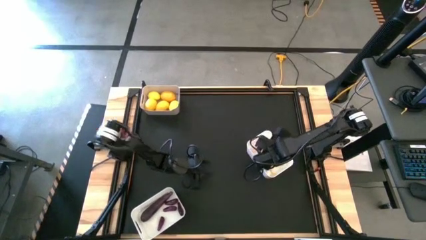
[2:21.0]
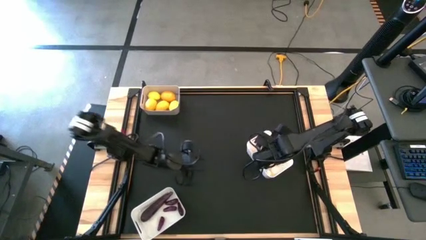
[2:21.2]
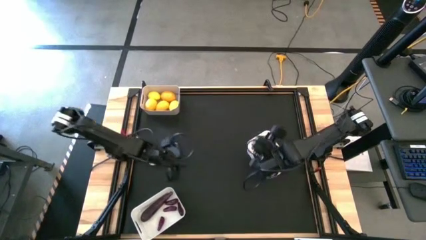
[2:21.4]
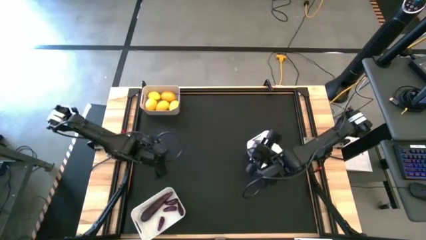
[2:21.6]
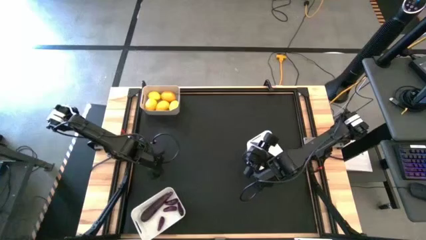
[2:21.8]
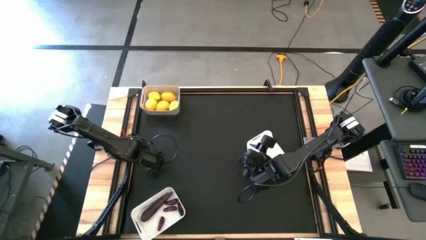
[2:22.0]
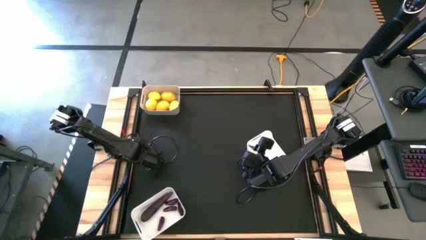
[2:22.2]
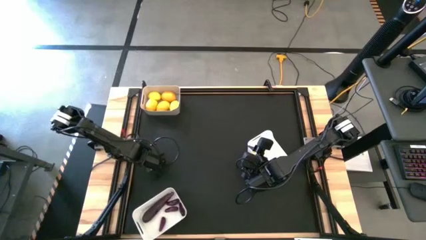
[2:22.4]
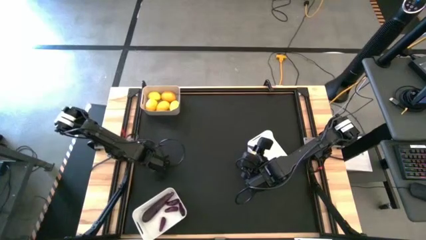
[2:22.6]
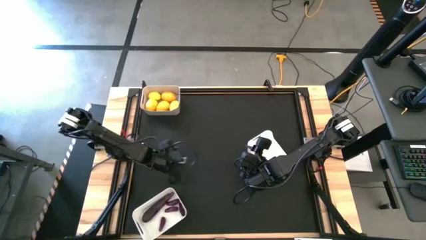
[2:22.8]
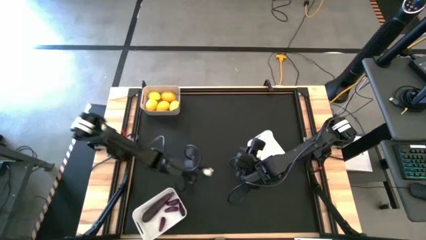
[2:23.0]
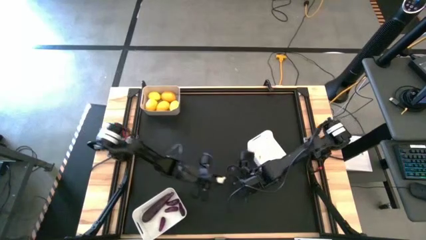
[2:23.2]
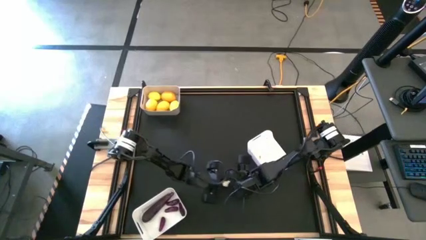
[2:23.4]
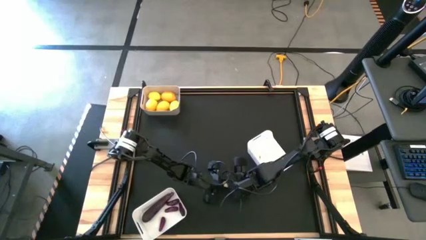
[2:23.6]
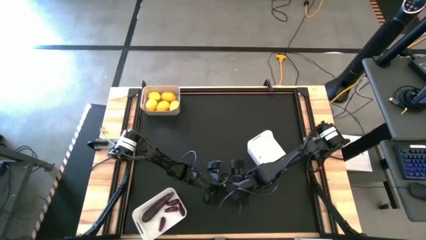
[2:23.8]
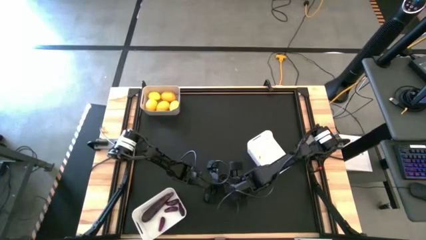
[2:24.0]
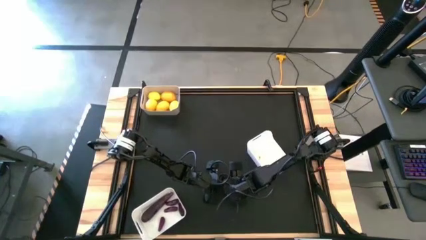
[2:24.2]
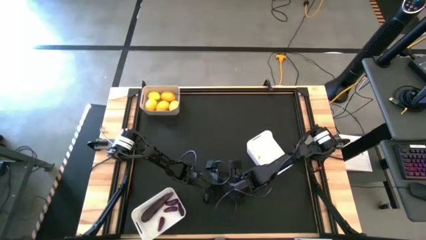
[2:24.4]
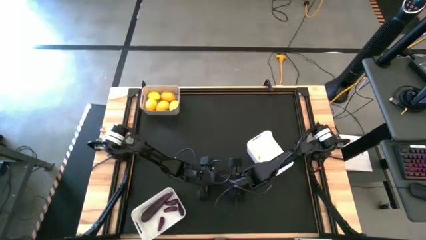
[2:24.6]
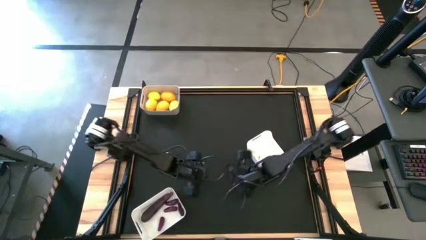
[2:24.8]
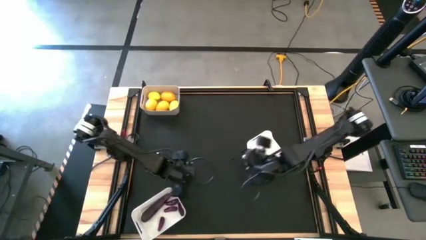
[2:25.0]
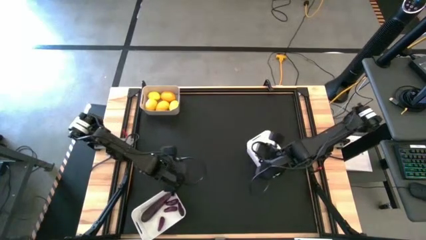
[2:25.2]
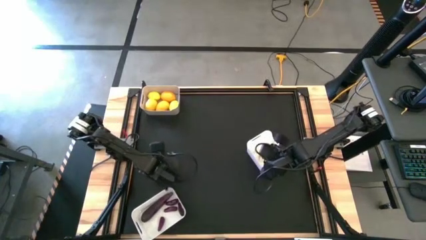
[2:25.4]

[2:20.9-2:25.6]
Task: Sort produce into baskets
Put the garlic into the middle right white bin

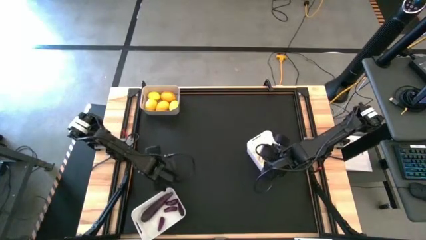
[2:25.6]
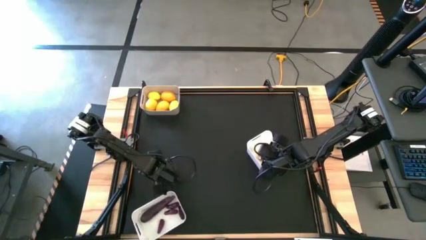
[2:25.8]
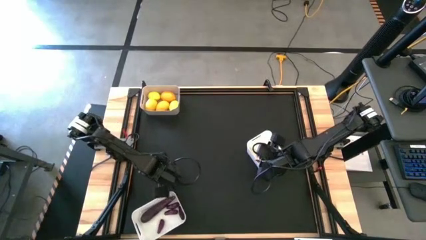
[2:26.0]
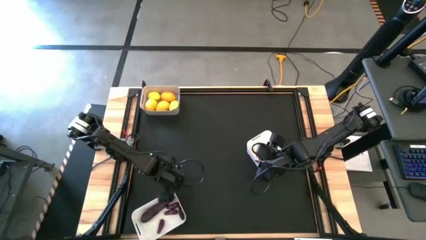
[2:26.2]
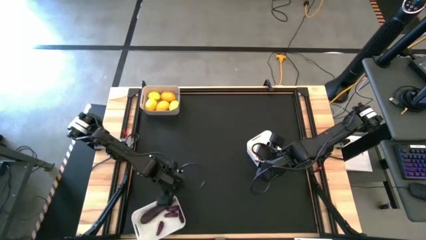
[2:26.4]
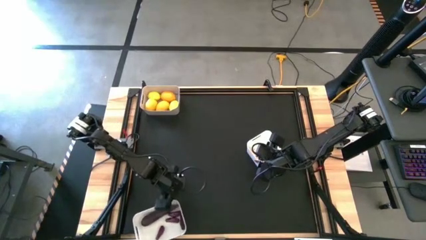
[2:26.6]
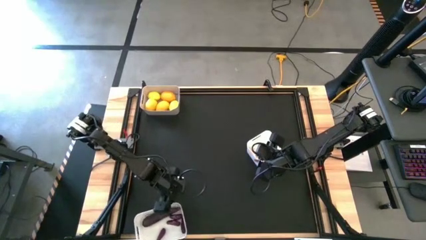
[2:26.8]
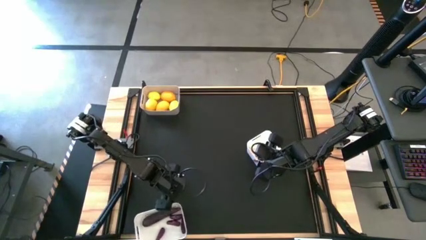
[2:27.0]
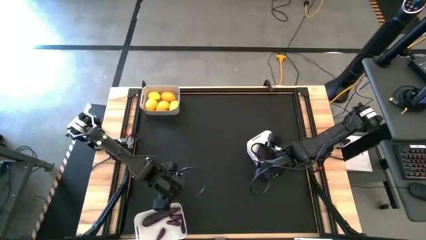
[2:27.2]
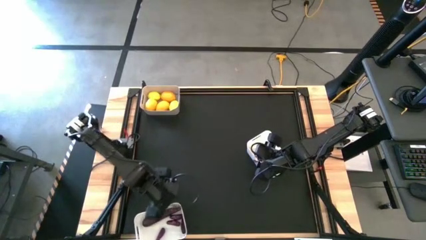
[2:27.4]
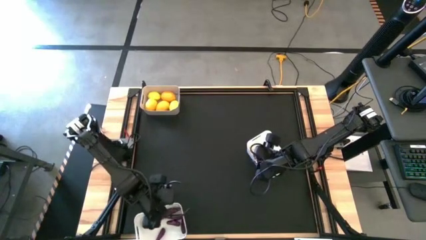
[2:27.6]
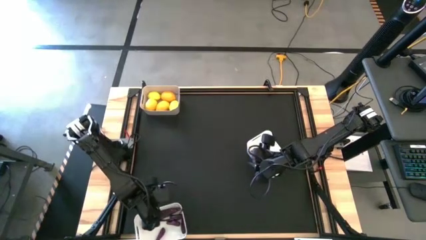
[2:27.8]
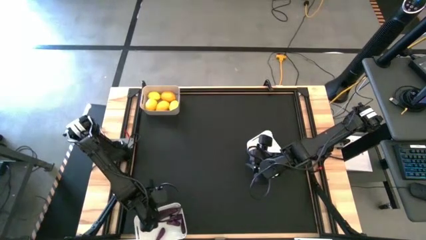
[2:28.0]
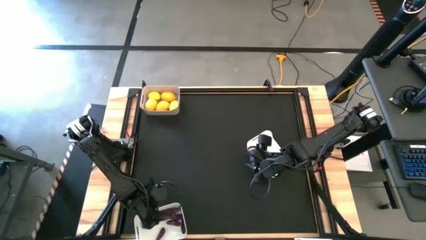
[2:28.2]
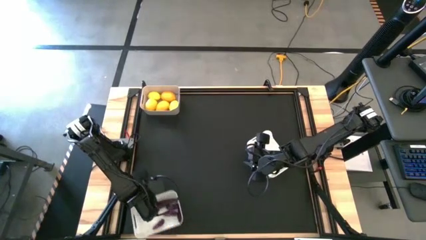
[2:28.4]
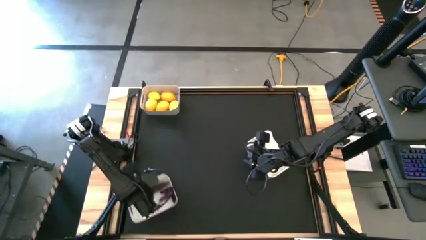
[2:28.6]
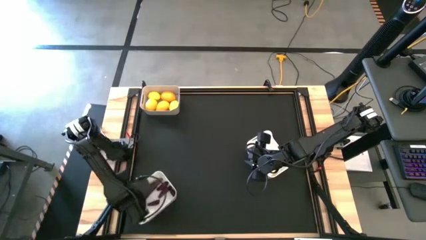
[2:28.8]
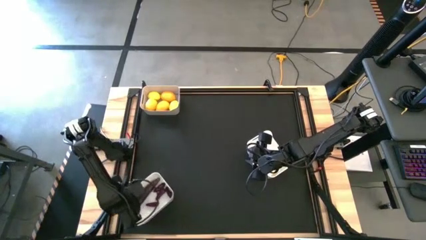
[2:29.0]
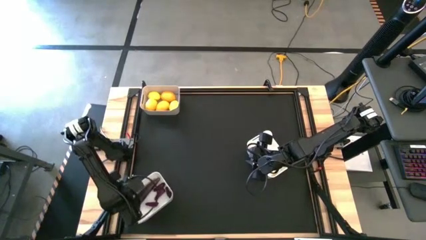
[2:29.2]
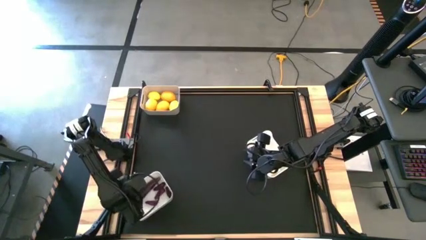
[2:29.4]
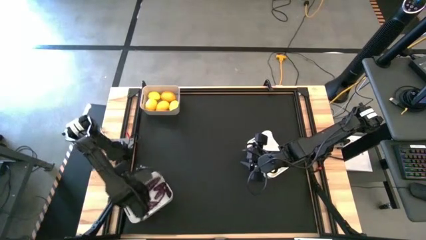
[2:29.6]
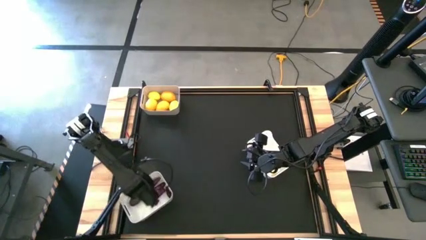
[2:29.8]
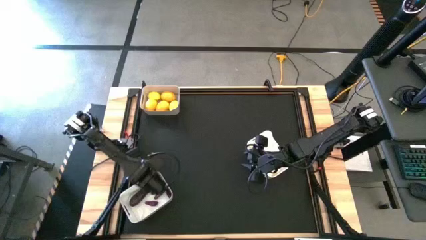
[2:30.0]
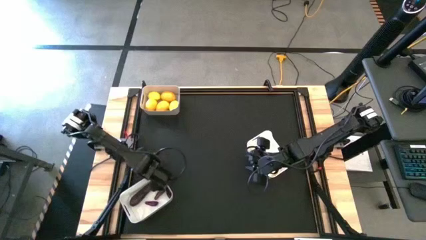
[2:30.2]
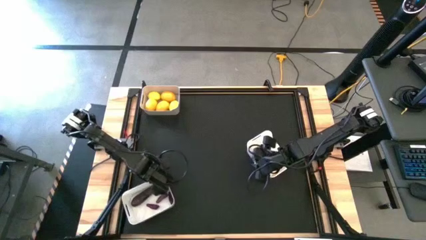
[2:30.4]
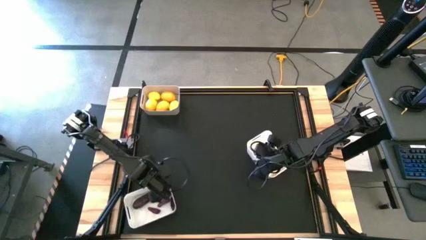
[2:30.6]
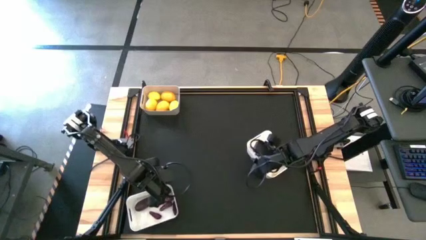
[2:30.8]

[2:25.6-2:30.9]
Adjust the bottom left white bin

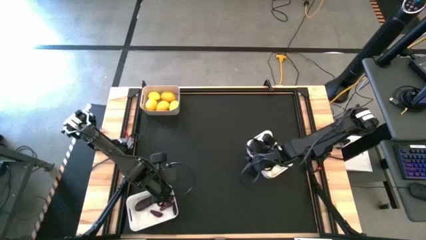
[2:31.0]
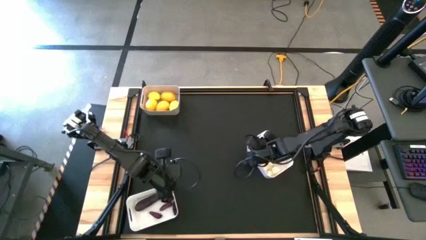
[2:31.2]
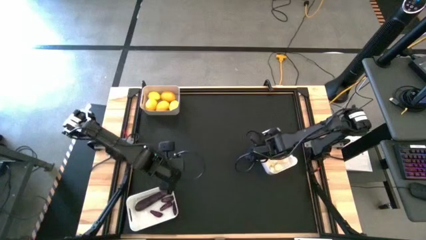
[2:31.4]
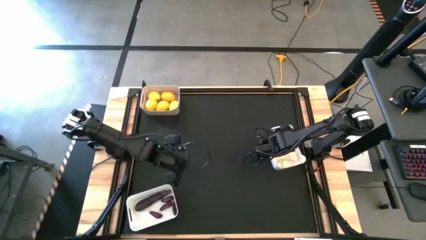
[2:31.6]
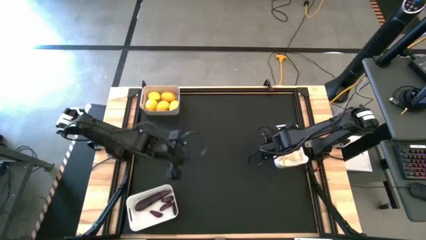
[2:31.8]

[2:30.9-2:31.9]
Adjust the middle right white bin

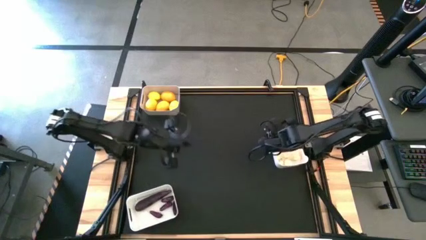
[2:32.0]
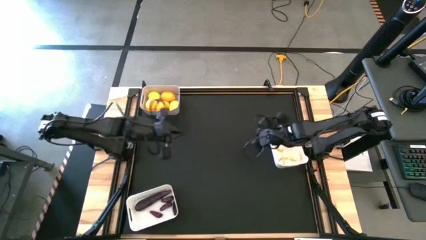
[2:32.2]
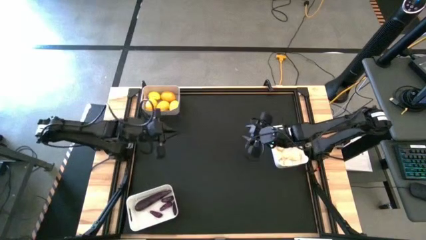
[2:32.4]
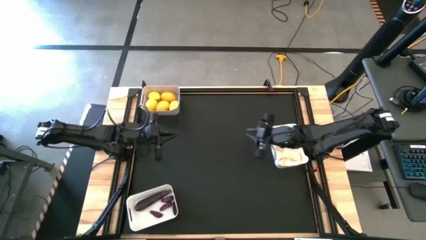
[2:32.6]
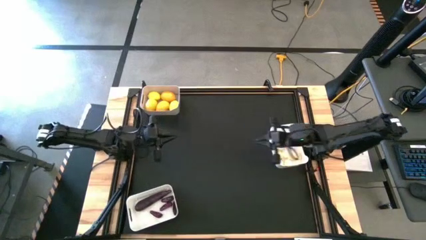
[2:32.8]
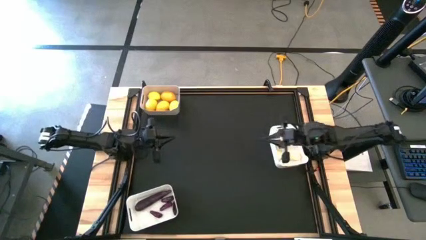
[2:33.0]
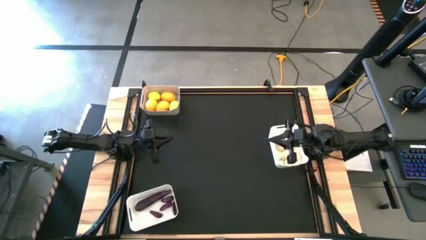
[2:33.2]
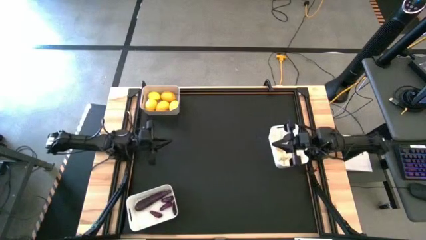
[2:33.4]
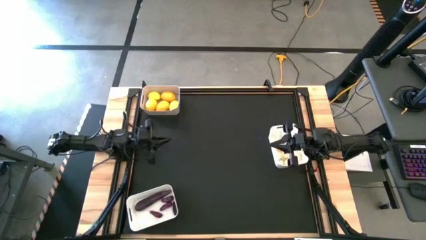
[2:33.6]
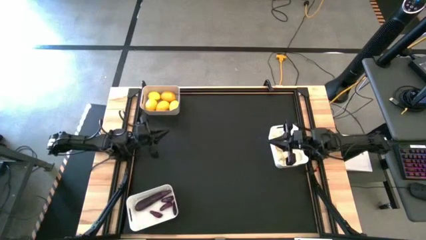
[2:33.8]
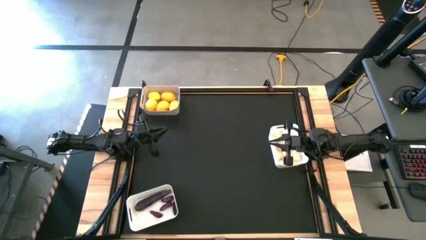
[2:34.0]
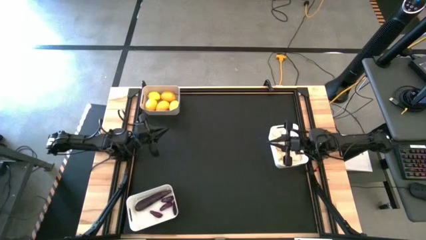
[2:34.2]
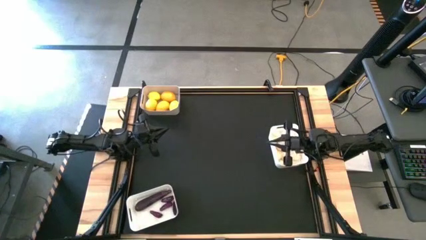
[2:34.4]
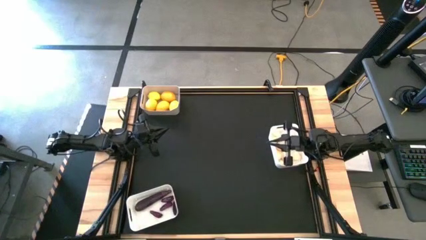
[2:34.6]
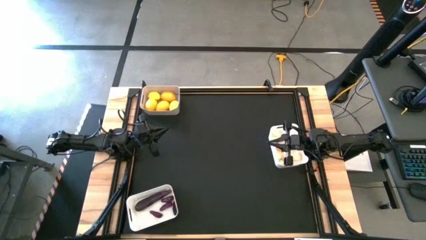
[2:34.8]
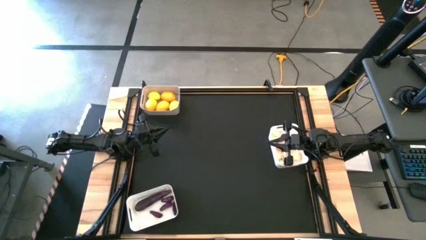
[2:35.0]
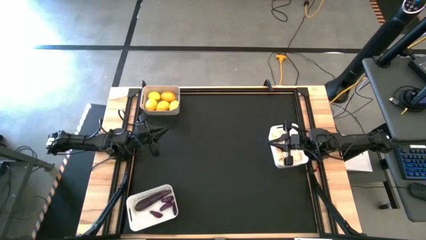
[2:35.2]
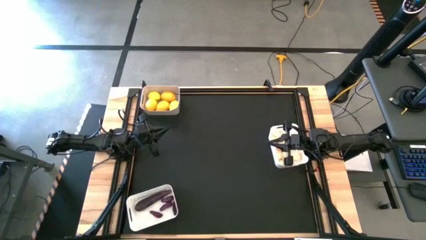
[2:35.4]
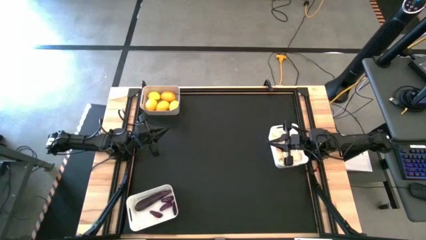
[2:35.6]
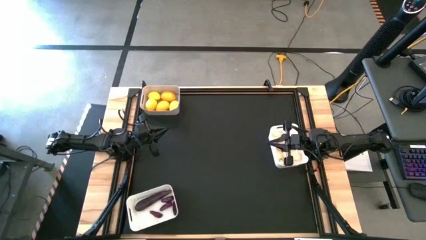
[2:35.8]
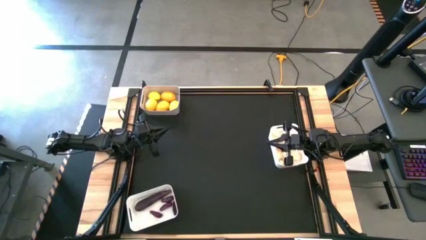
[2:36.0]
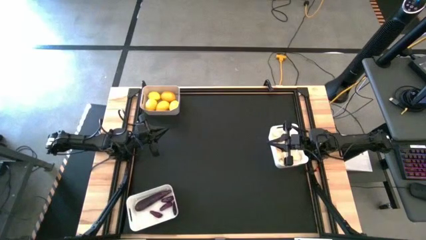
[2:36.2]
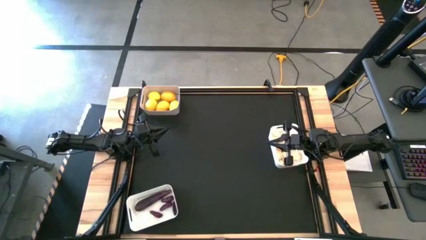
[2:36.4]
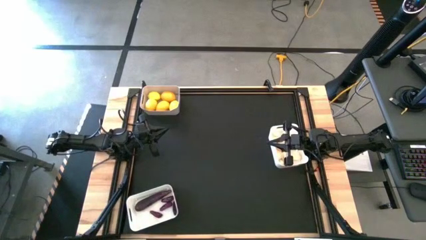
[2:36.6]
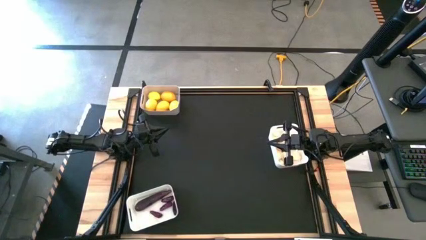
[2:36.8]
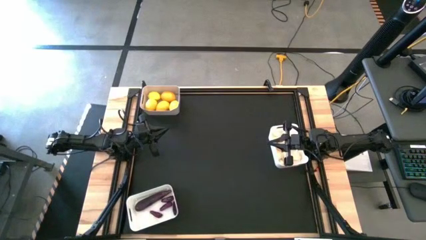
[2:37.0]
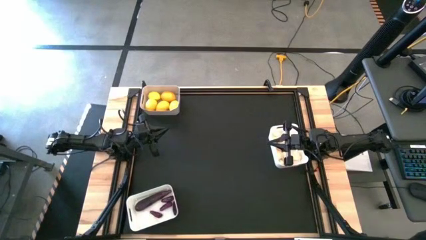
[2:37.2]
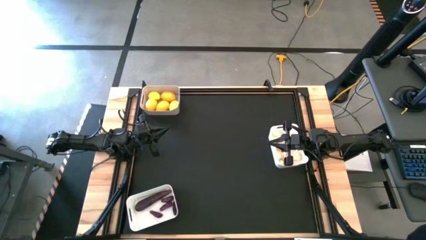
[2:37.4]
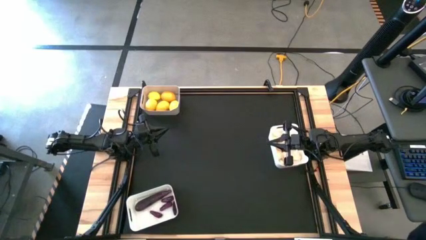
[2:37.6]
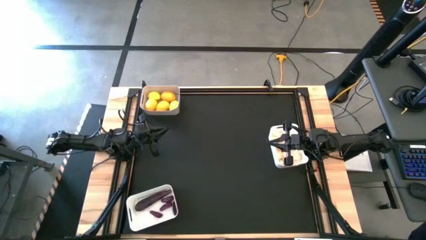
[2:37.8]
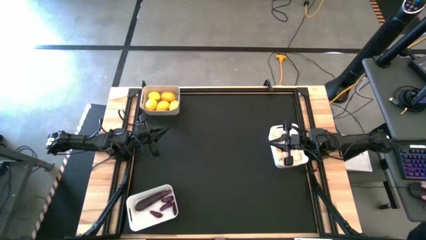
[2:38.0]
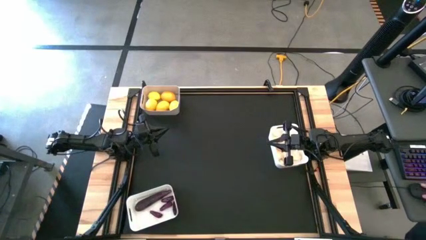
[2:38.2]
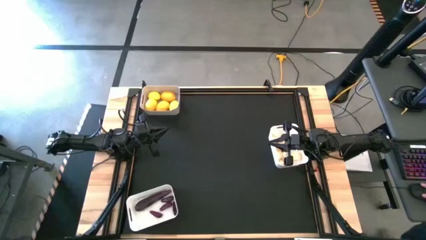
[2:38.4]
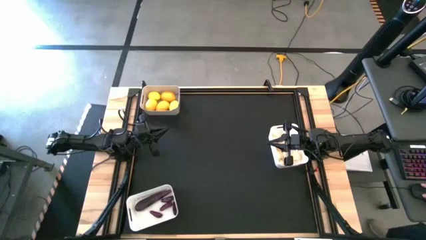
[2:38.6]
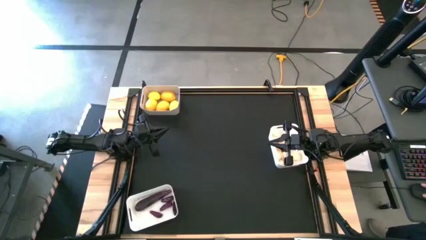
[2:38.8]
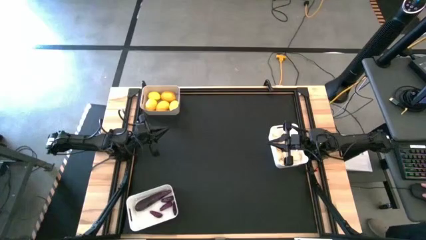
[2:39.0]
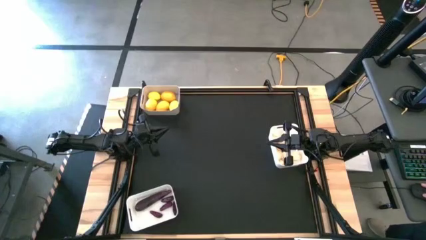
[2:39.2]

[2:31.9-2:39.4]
Return to Home Position
